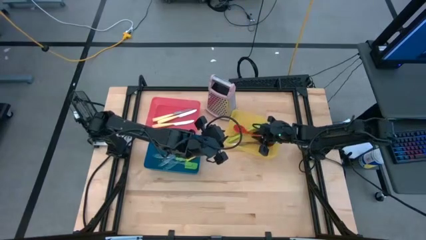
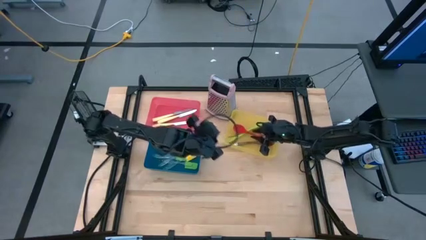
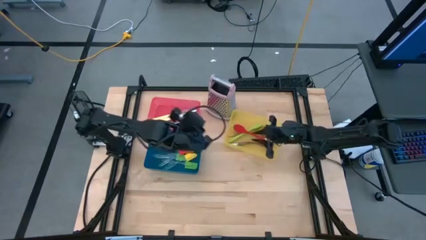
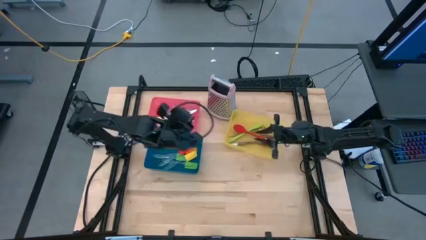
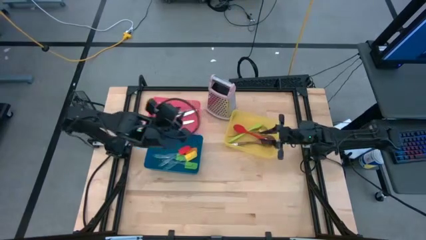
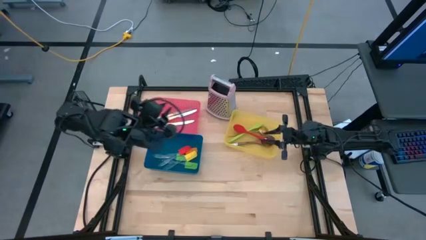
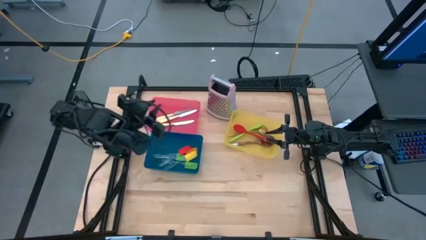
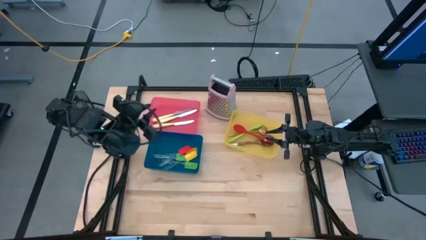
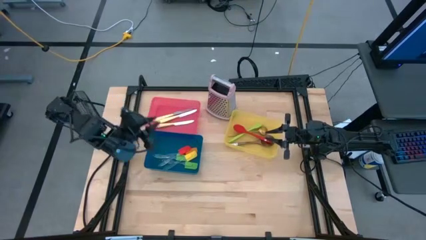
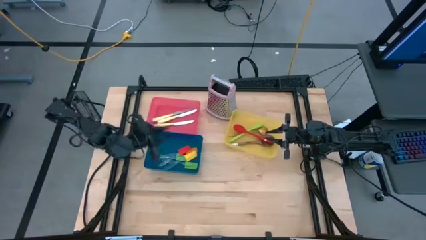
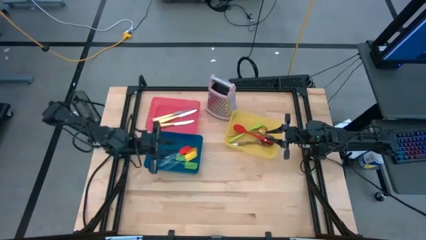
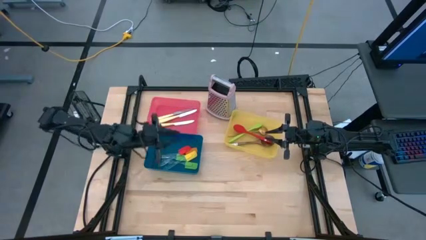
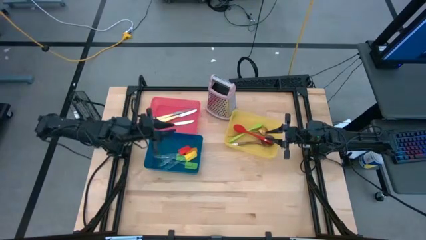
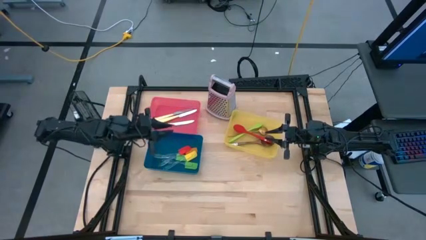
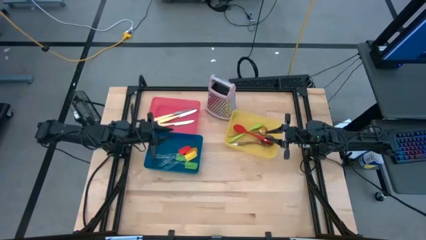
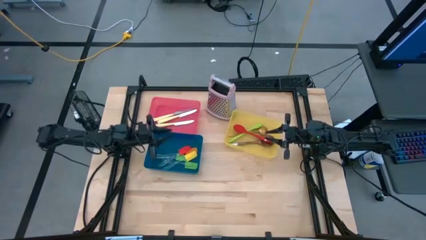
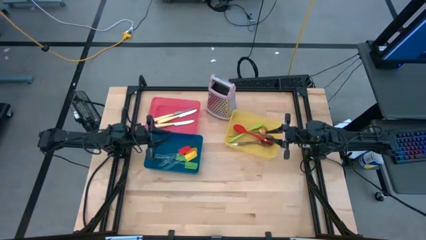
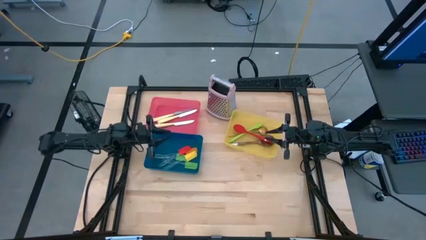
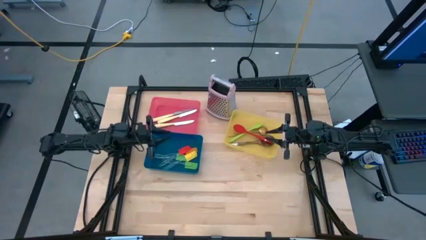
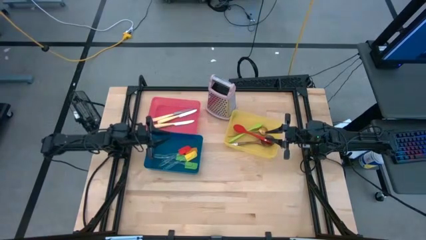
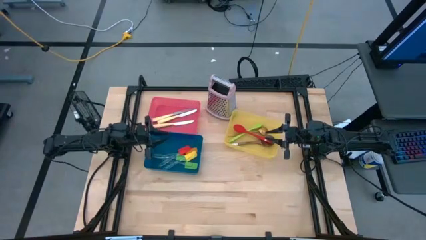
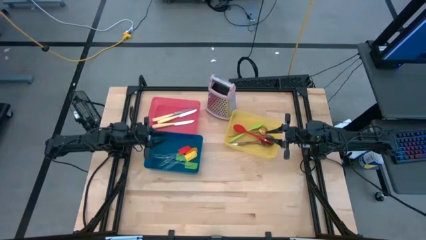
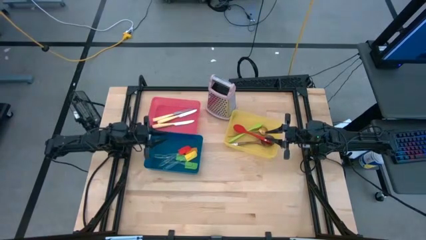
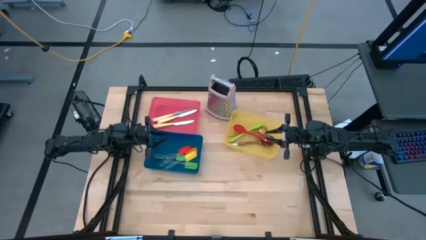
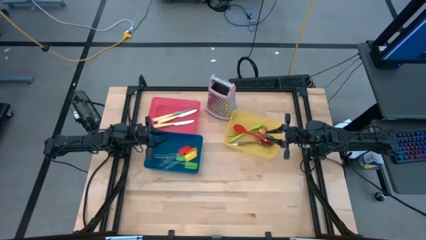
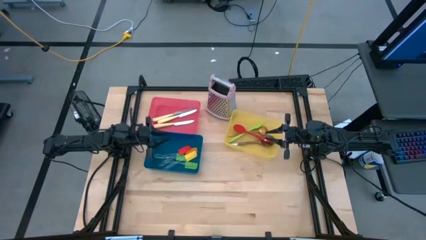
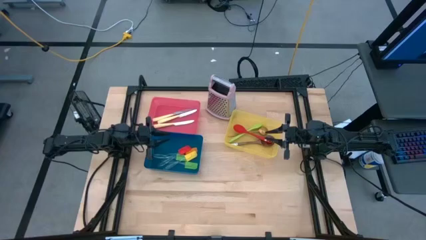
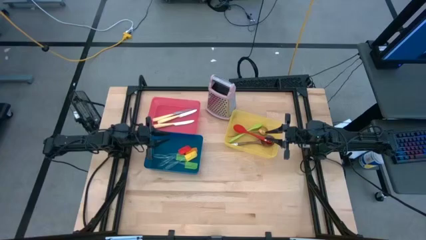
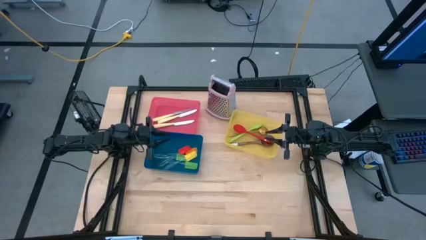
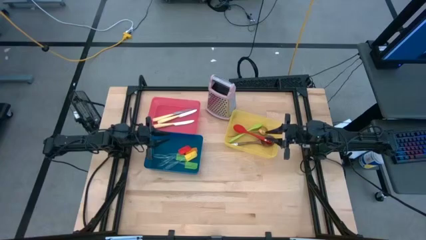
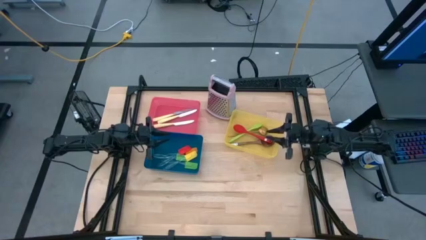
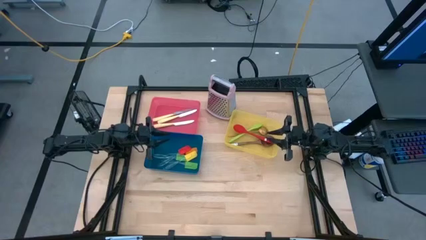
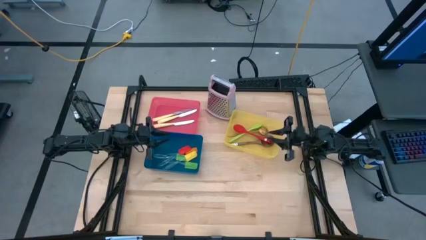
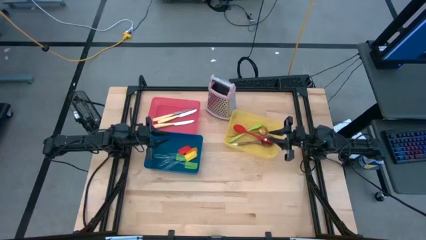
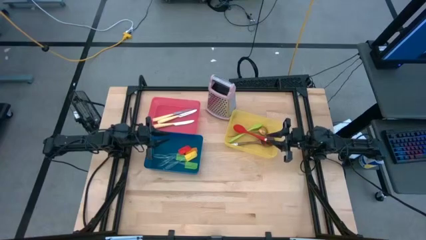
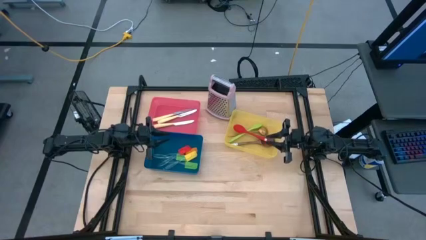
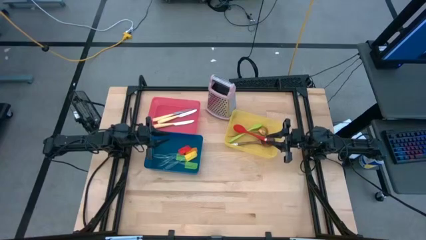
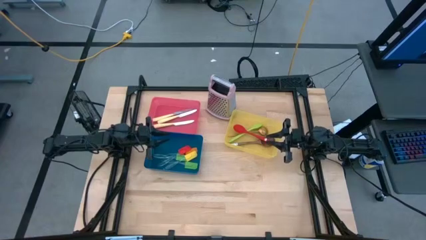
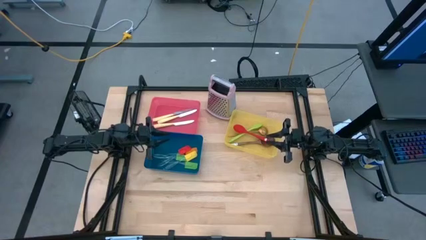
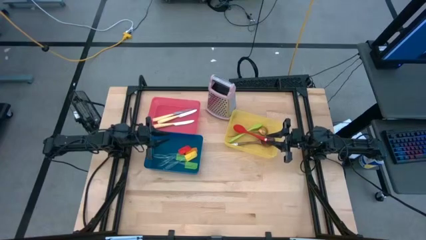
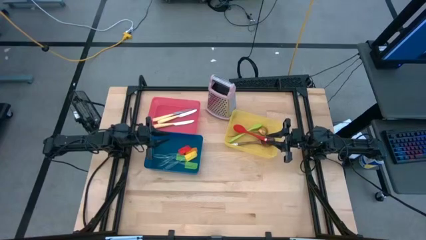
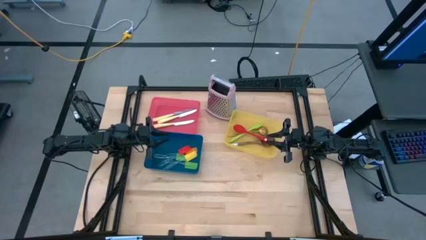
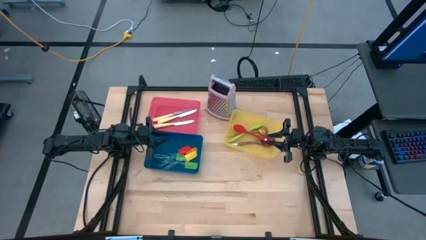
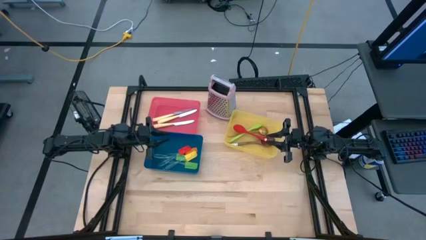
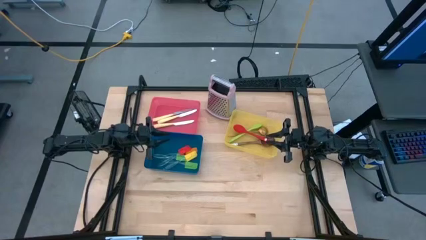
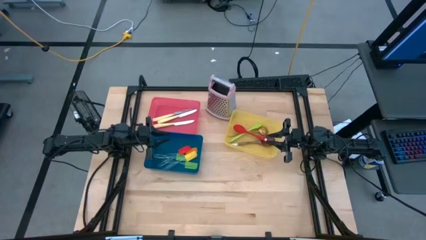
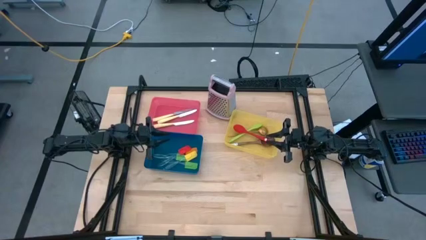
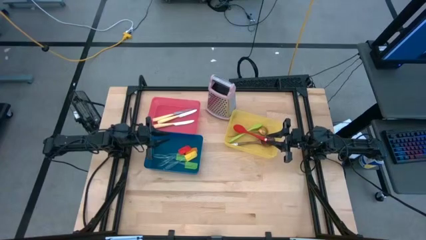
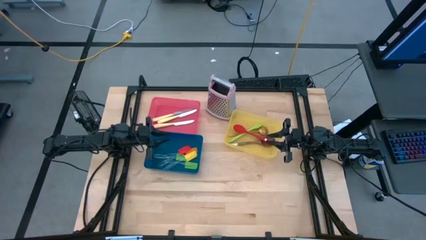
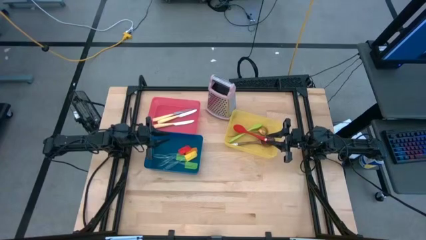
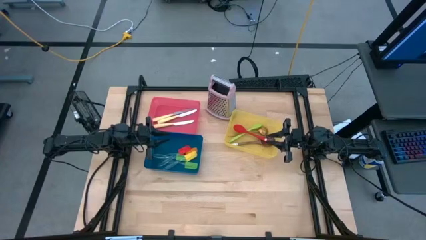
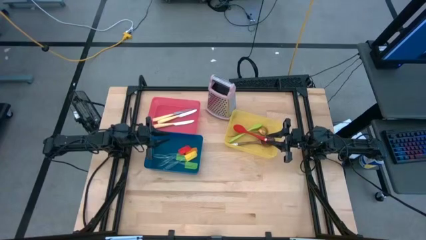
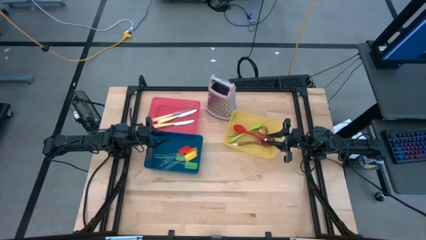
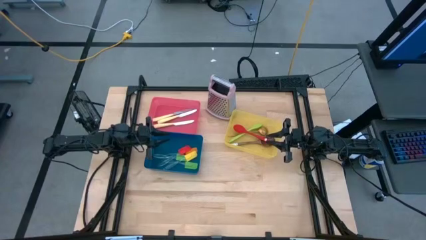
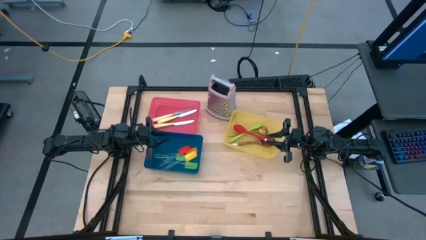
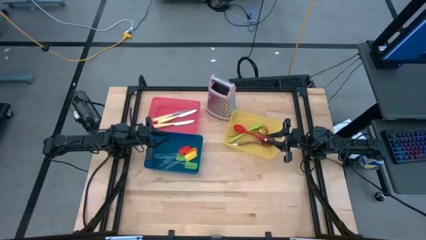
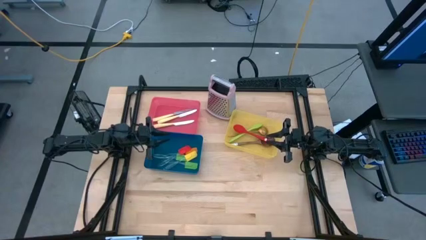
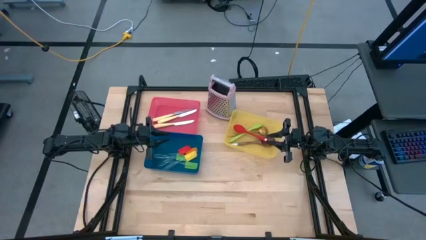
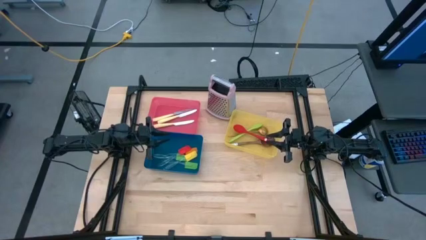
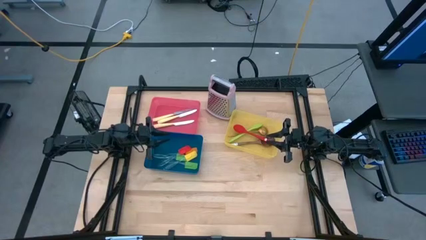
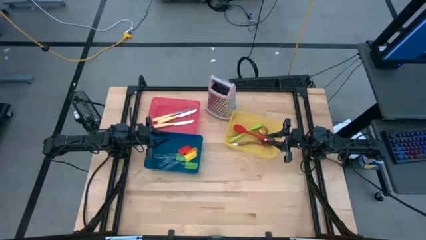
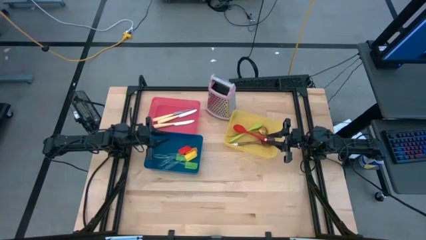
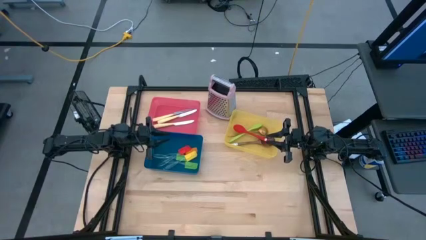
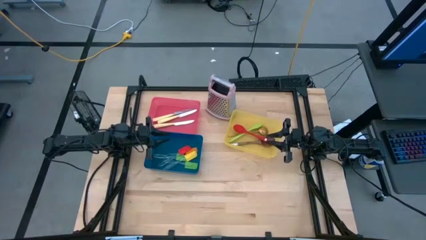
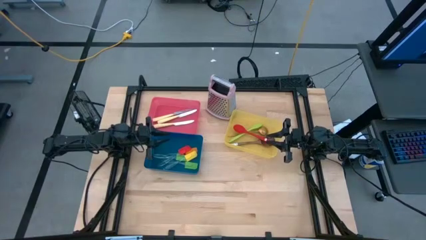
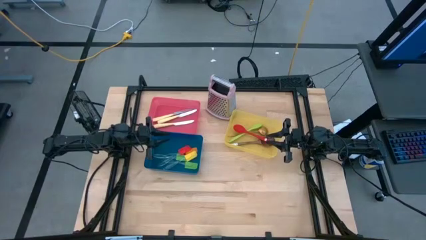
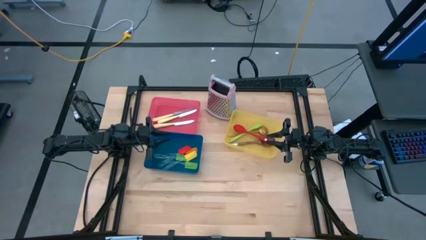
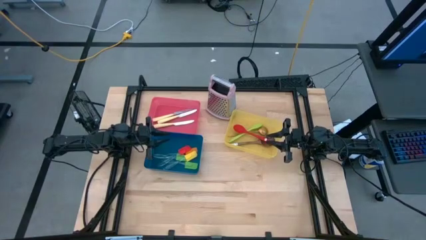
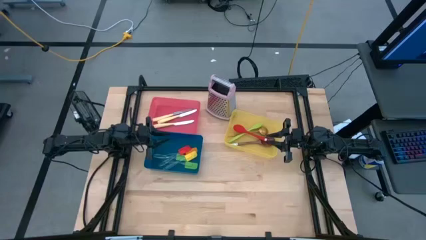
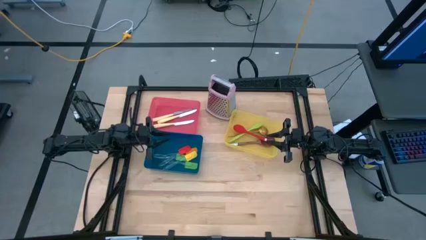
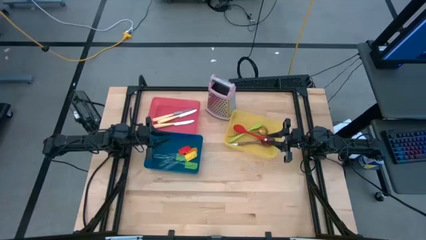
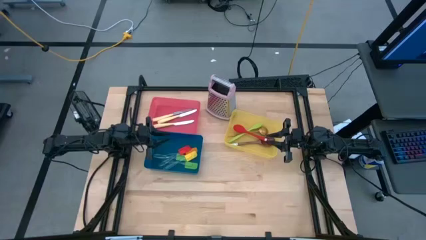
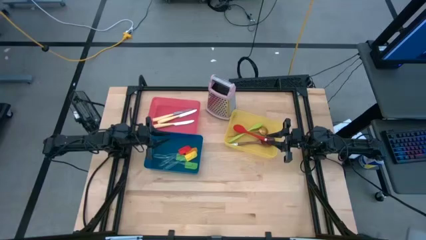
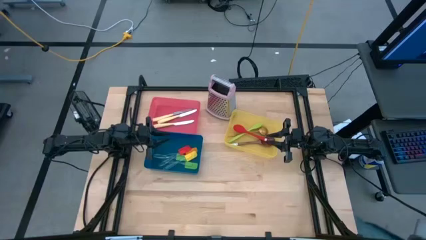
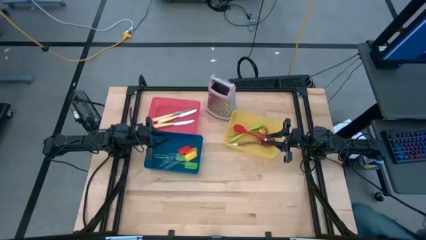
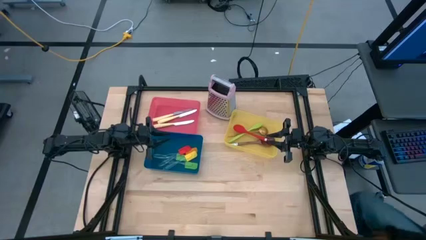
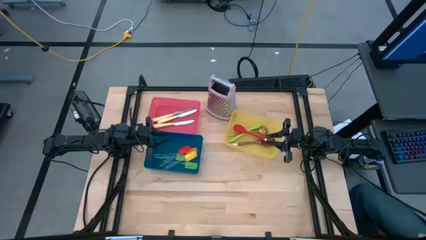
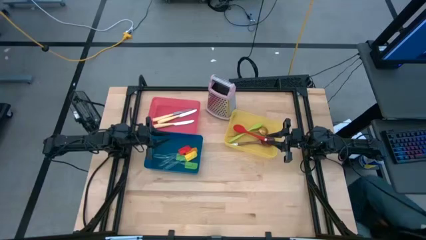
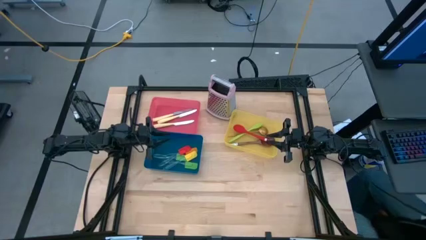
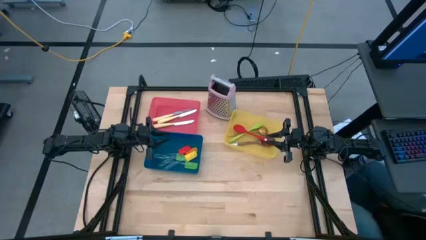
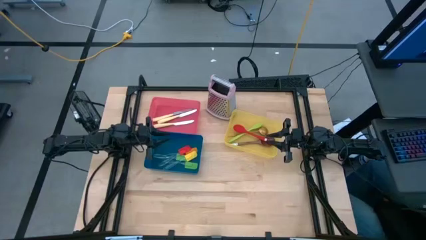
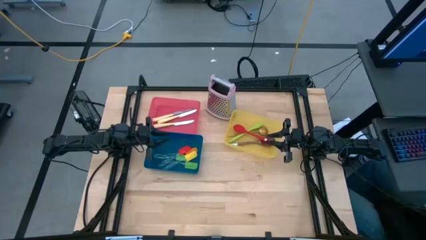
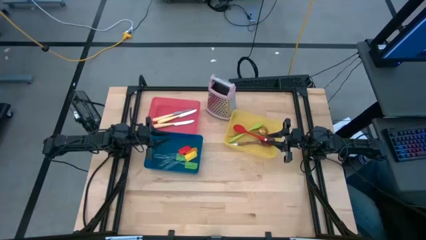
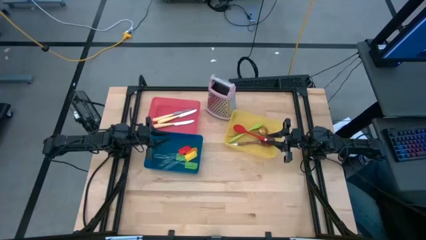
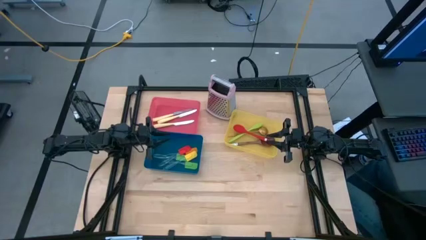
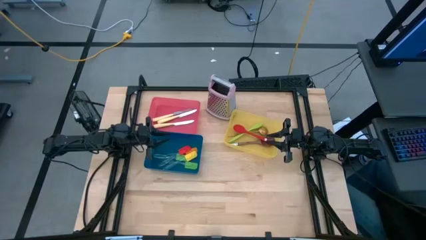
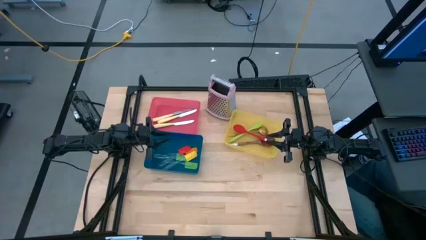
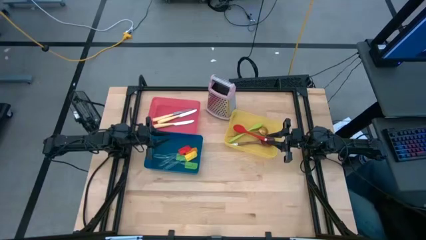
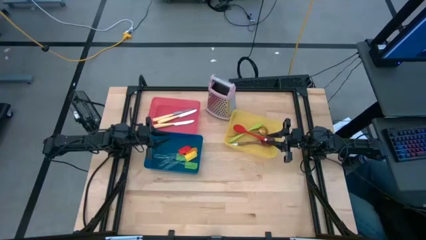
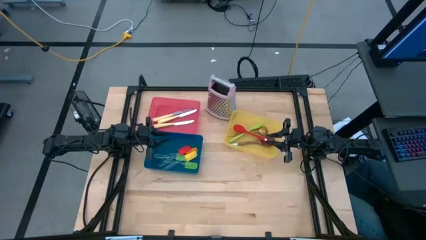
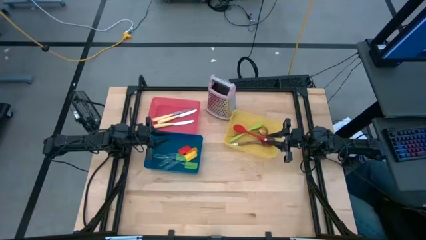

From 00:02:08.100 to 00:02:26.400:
Task: Pick & Place Kitchen Items
Return to Home Position
